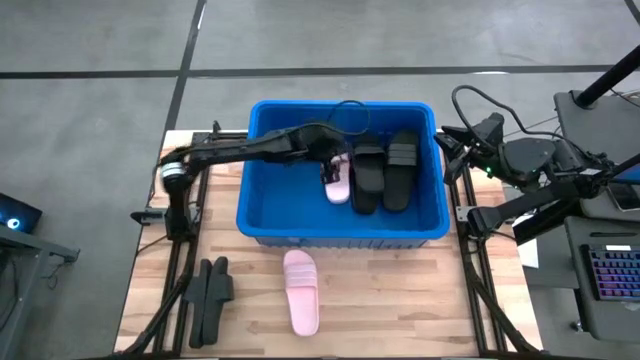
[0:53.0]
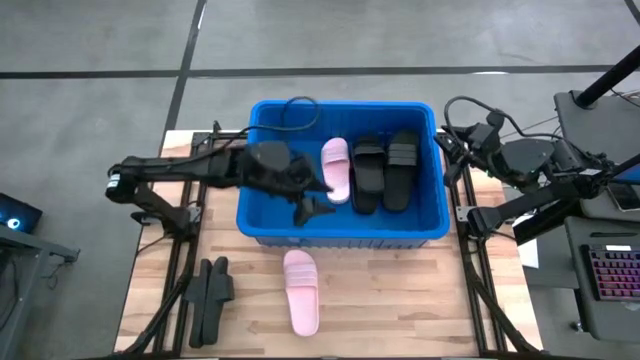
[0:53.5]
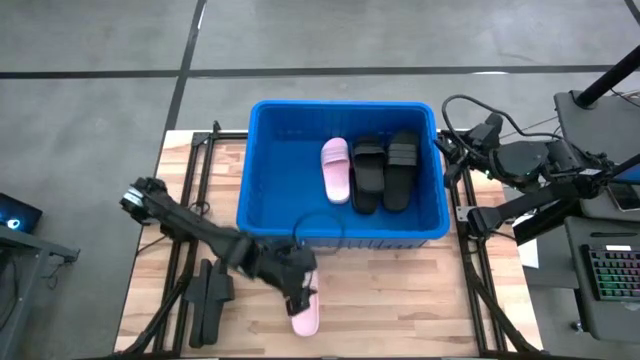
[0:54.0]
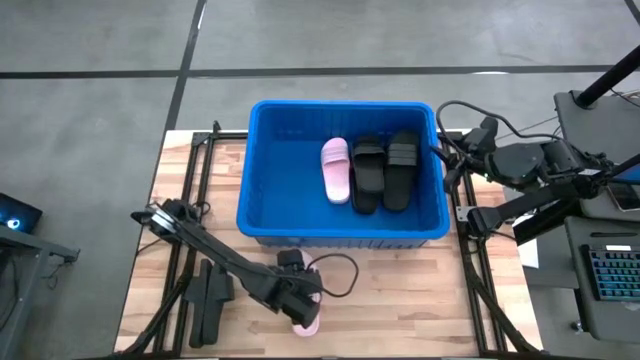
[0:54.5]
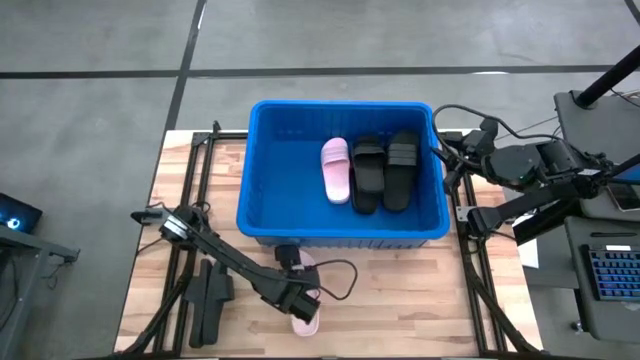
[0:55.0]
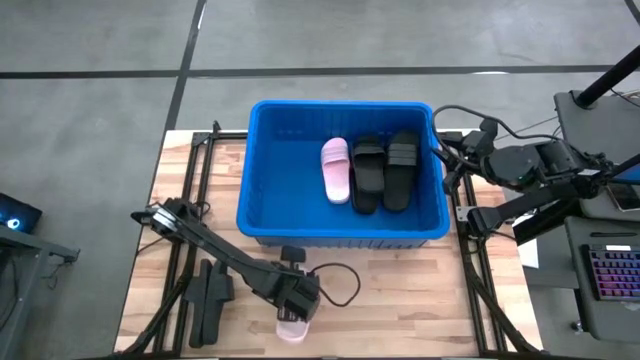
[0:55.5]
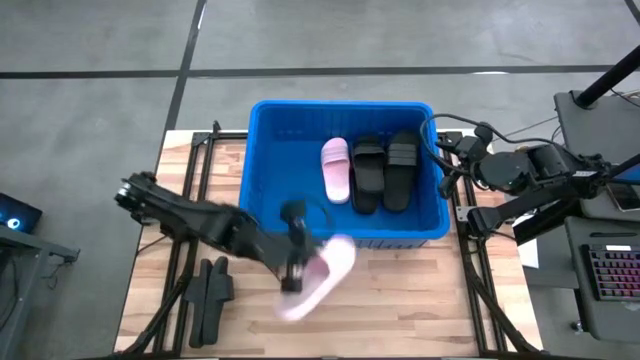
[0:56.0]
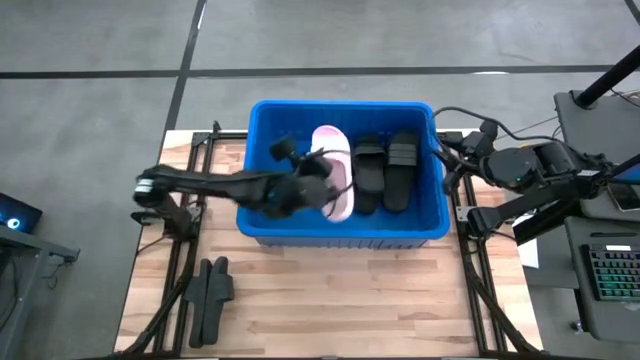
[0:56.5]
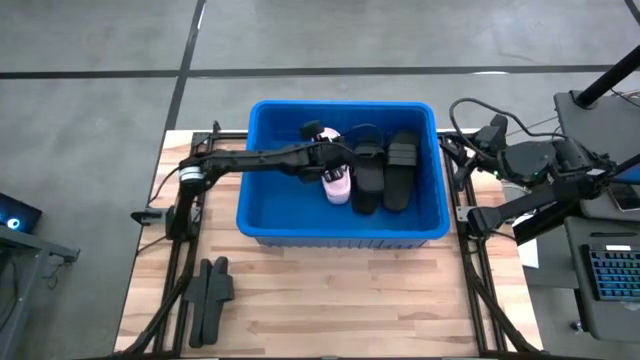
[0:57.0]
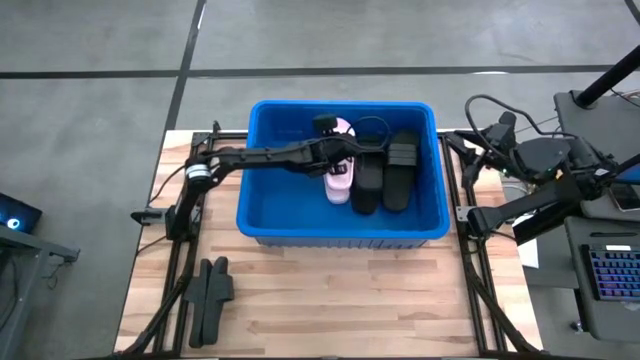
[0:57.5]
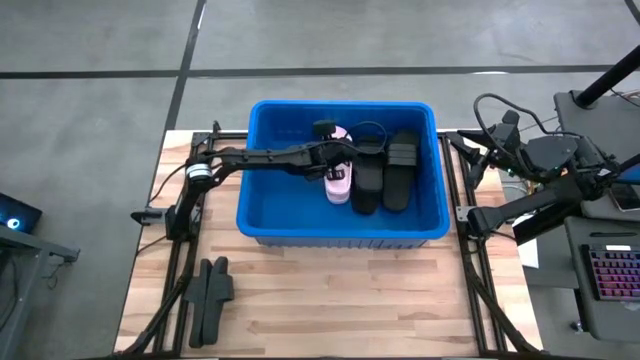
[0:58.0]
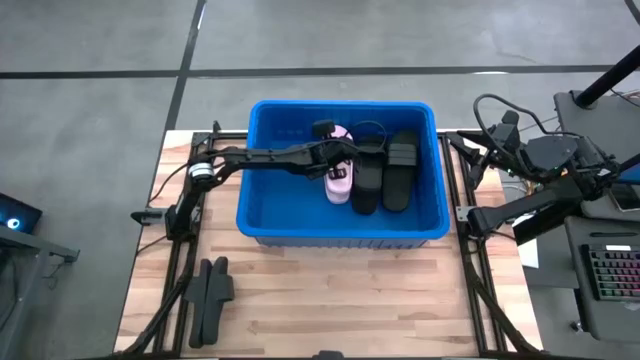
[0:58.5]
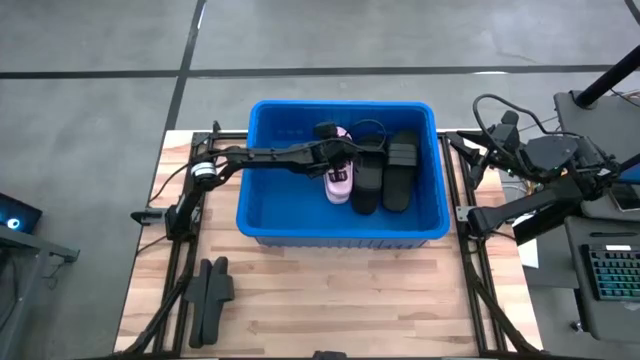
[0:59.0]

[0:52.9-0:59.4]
Task: Pick and place slides into bin
Put the pink slipper into the blue bin

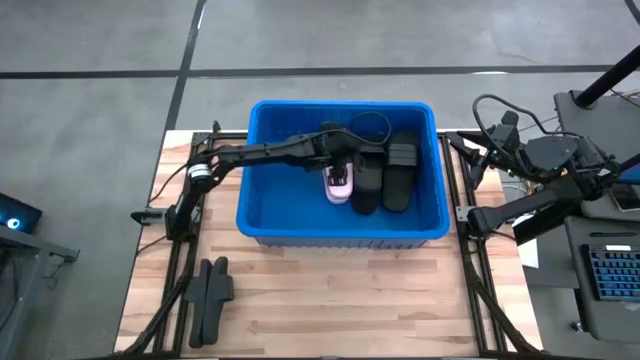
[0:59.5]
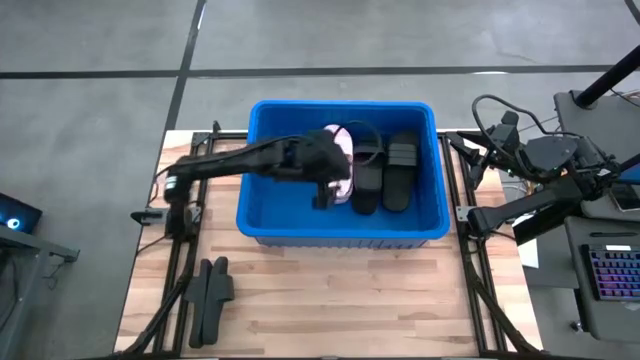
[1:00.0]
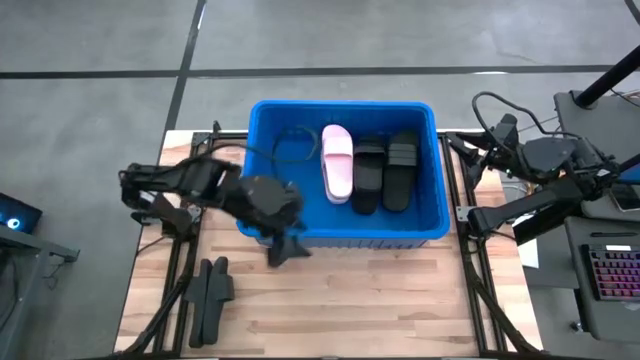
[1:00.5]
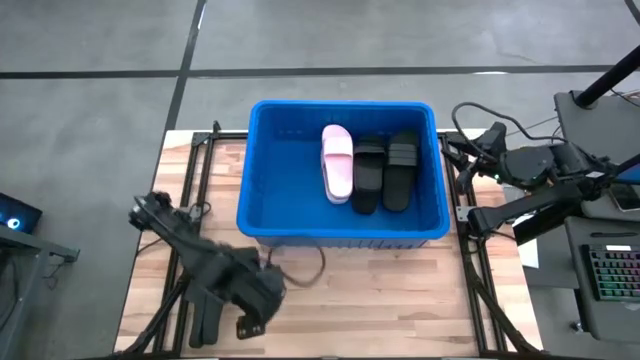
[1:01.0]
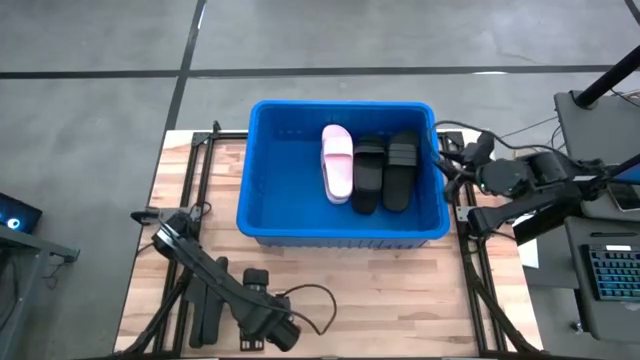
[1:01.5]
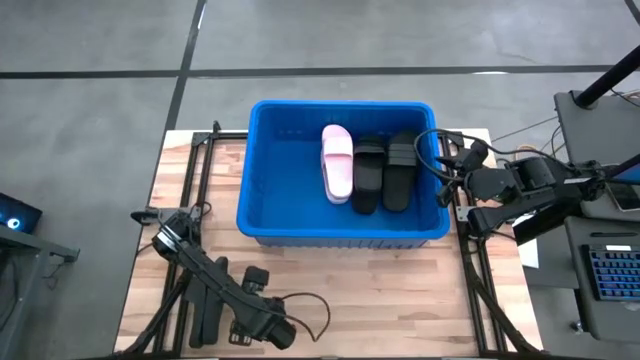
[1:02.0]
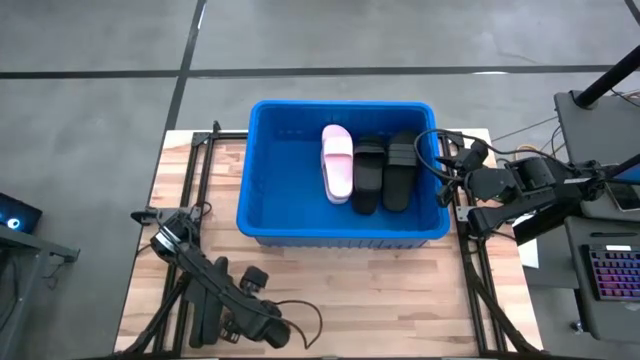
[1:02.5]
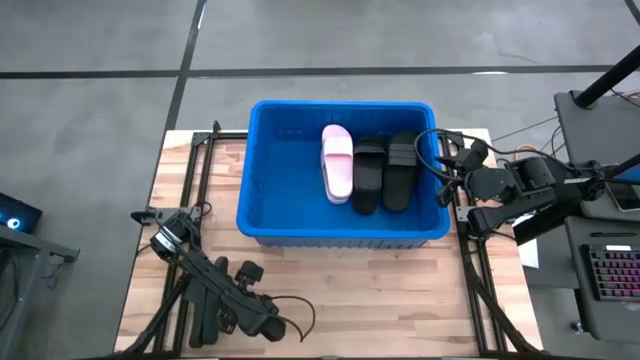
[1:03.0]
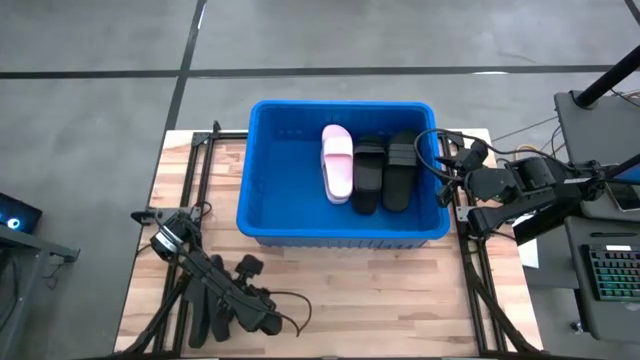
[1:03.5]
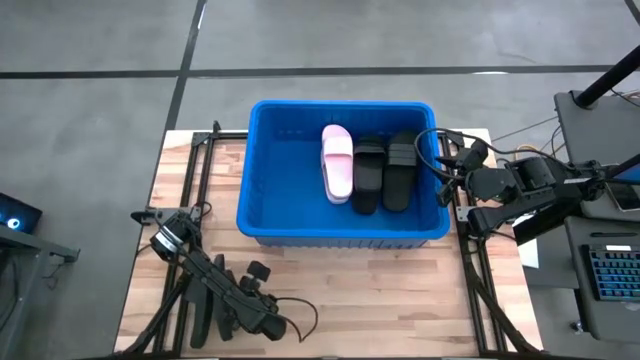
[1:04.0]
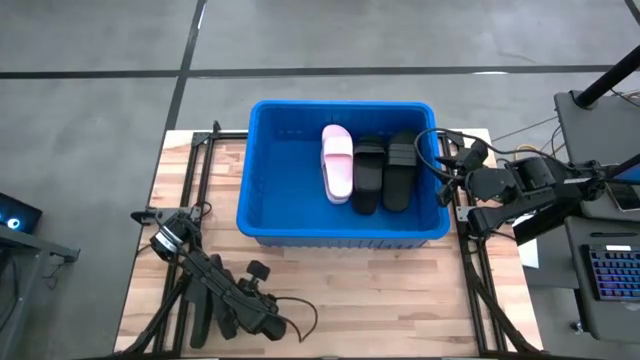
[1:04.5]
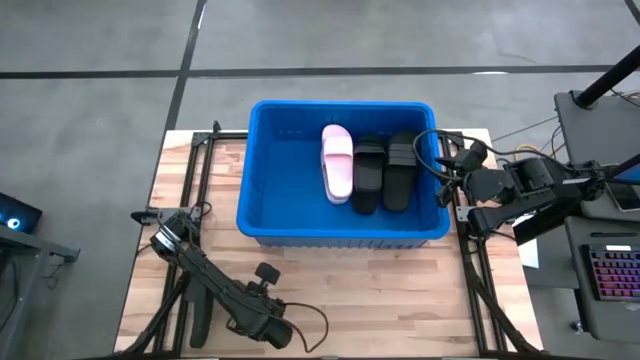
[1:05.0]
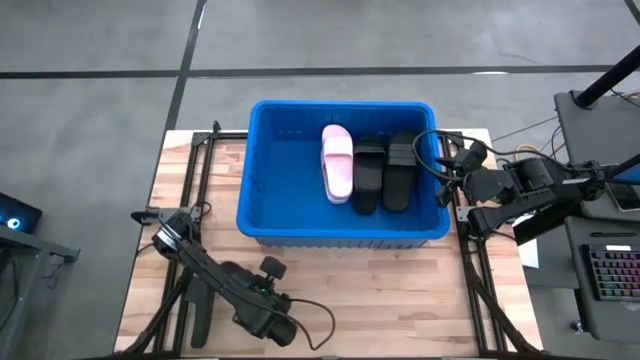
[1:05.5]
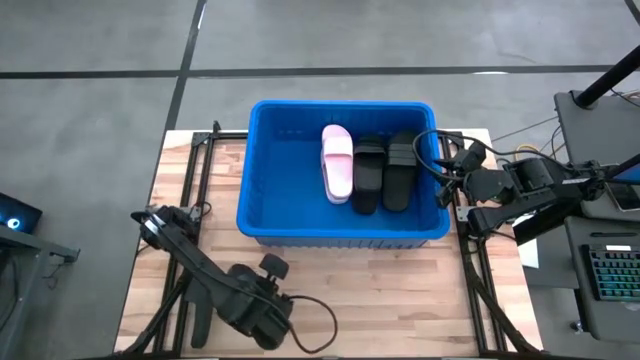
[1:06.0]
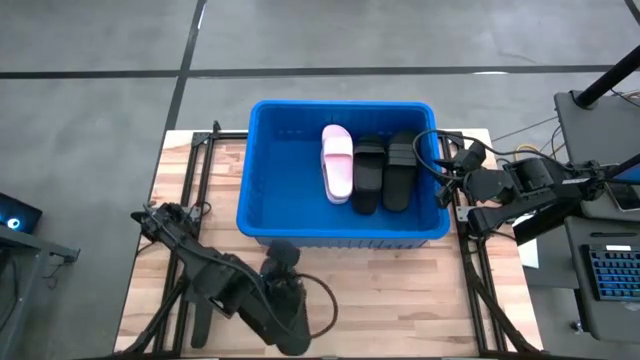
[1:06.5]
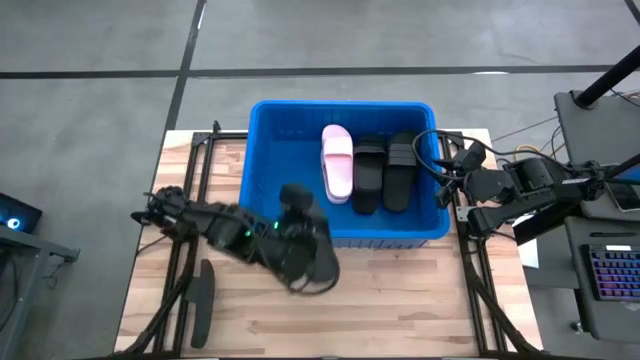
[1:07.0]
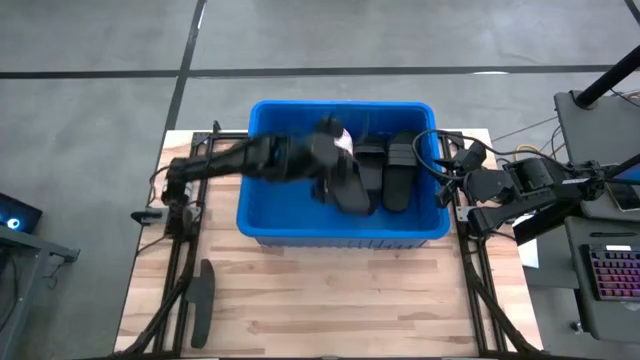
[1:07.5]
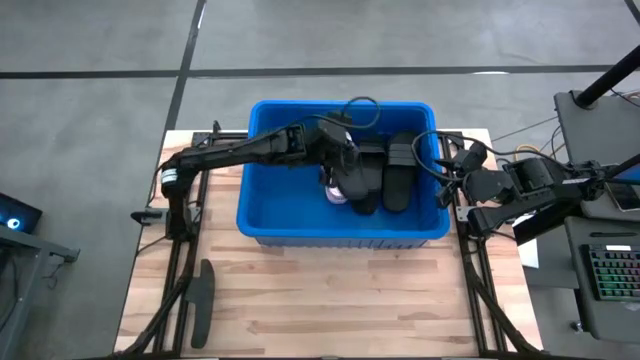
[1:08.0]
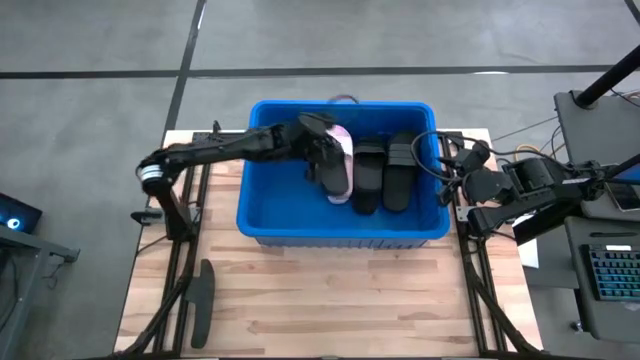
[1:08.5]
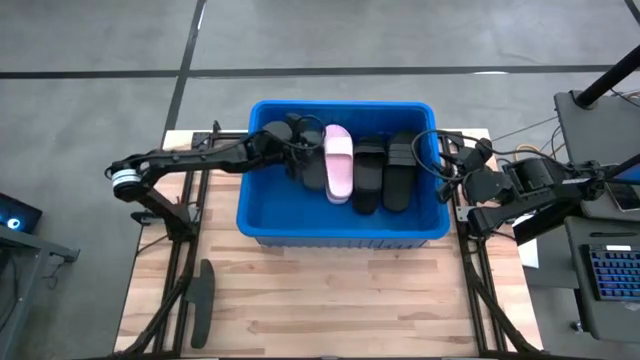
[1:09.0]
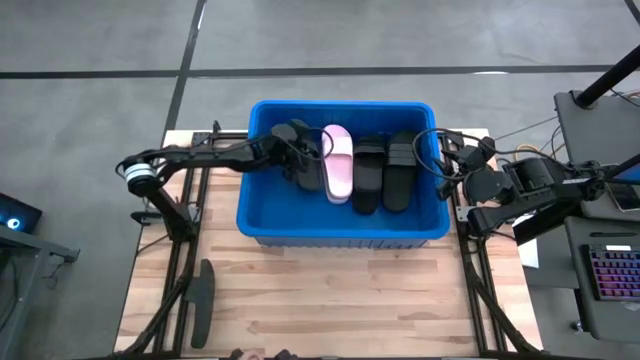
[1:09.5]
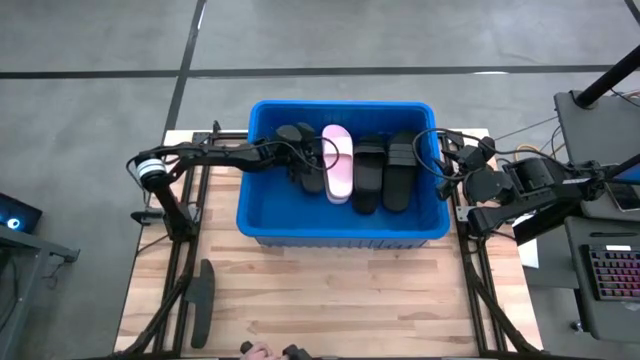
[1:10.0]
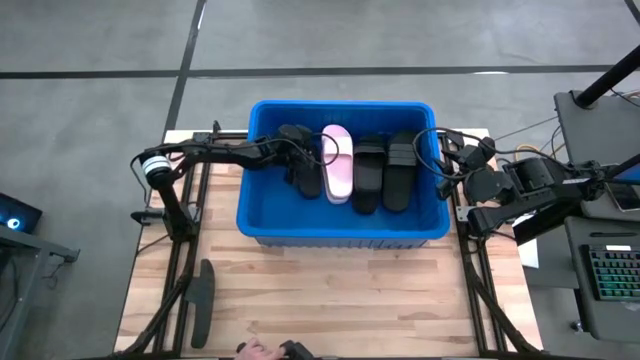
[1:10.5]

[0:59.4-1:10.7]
Put the black slipper into the blue bin

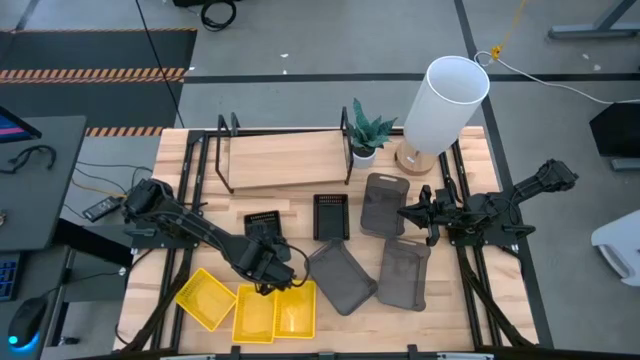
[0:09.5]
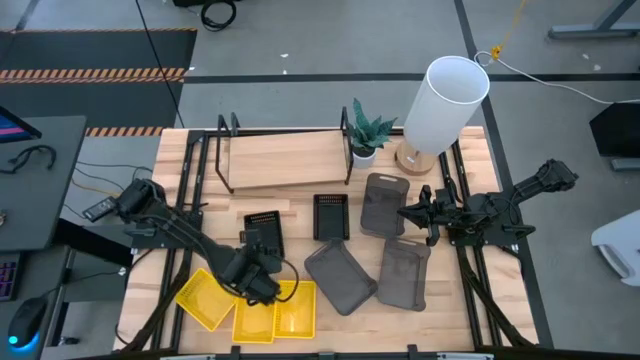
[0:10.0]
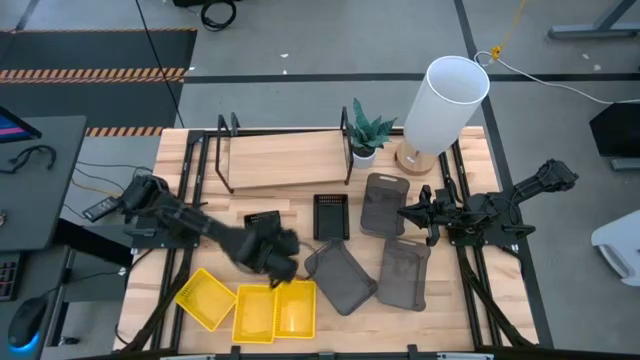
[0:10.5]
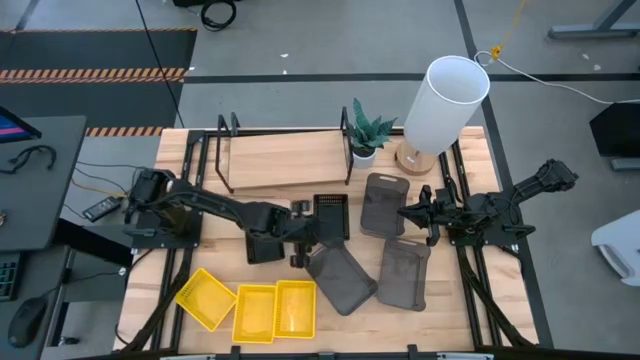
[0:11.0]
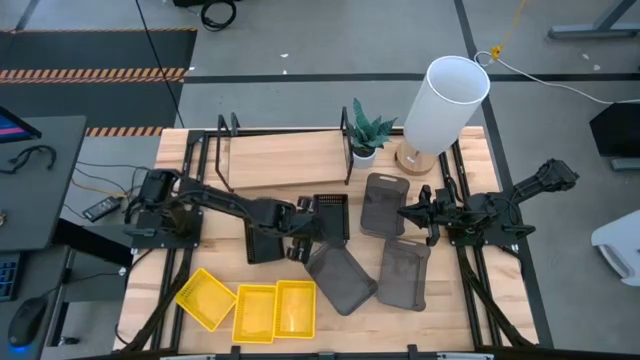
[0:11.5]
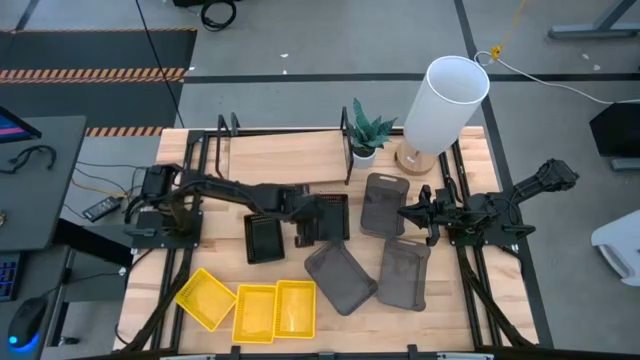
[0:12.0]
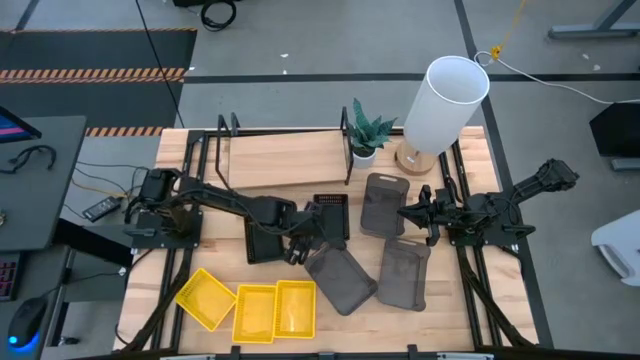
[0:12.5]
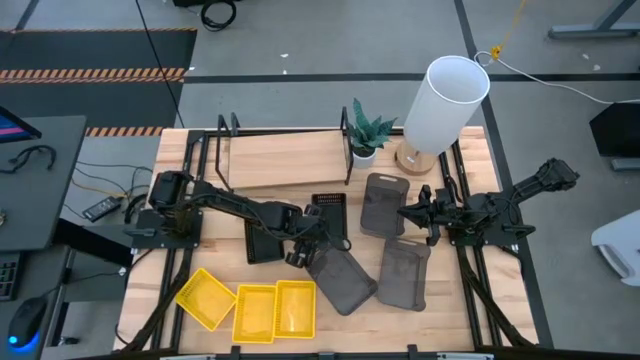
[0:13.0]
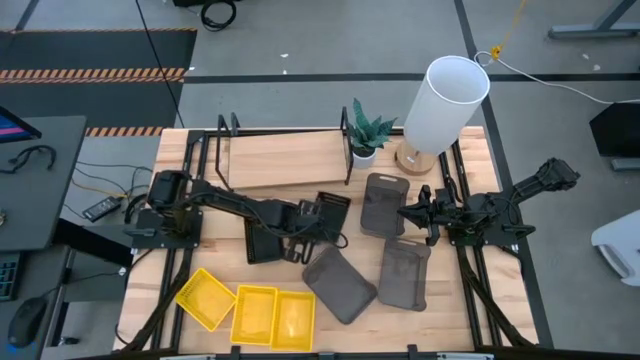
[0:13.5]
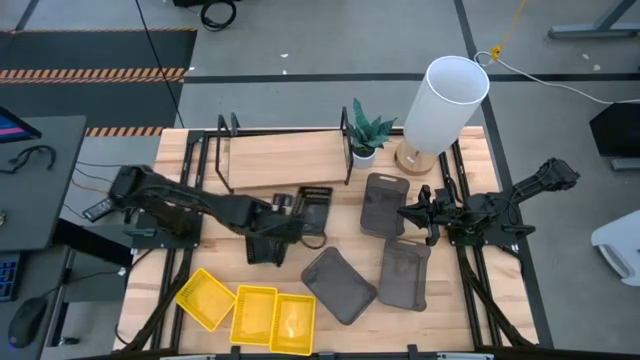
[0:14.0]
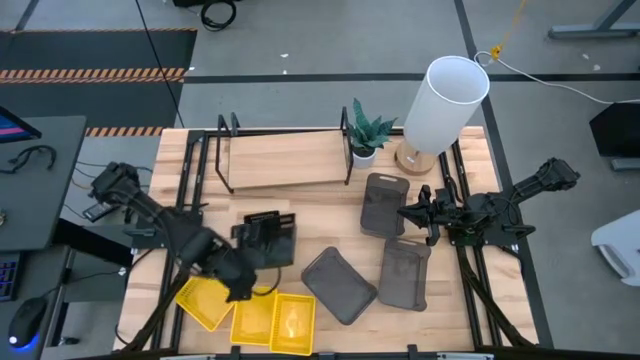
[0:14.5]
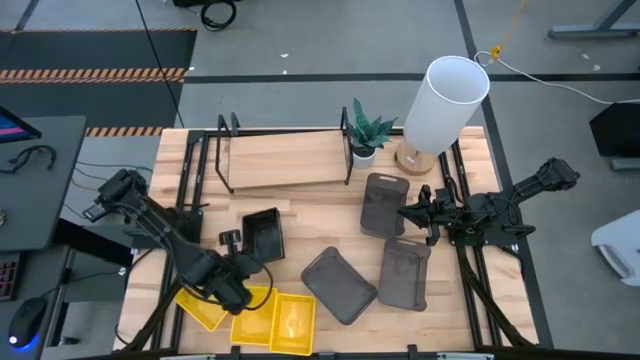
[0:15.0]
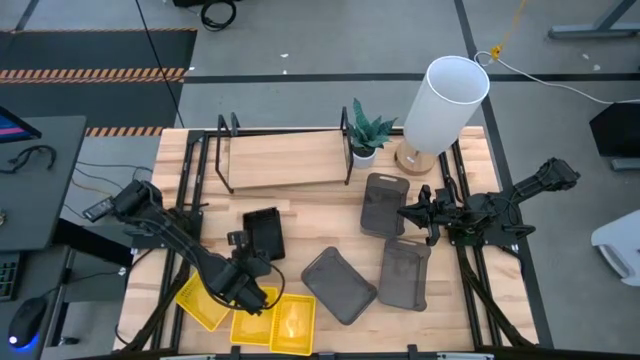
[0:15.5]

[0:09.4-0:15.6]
Task: Stack baskets on shelf by color
Stack the right black bin on top of the left black bin
